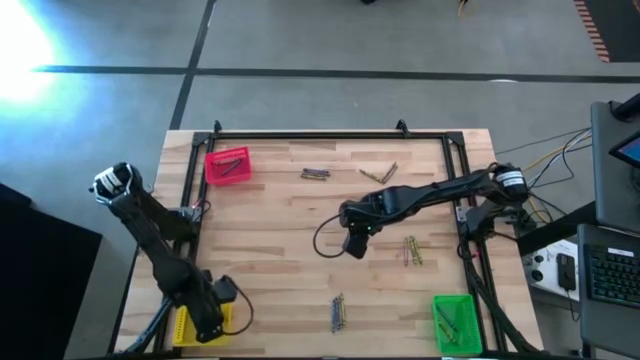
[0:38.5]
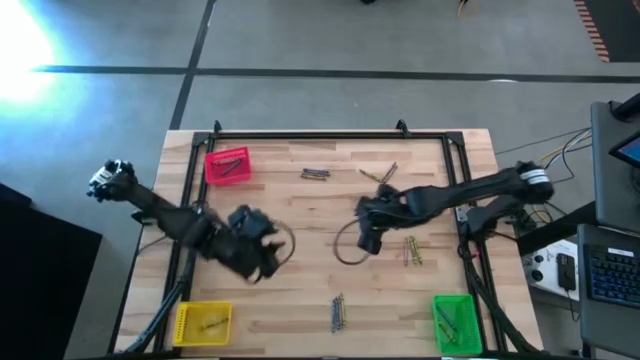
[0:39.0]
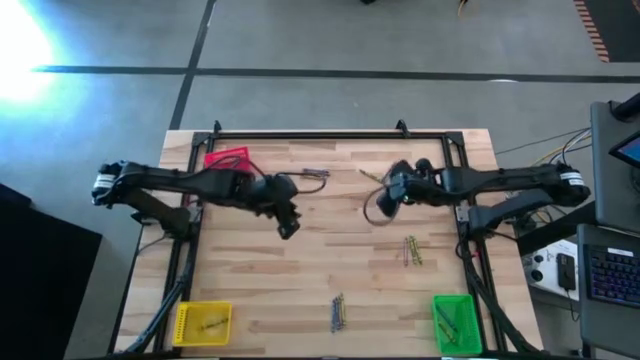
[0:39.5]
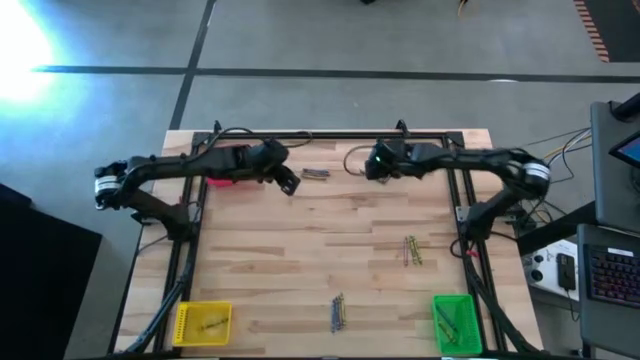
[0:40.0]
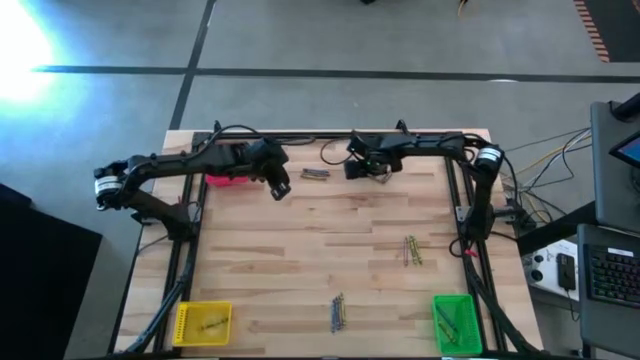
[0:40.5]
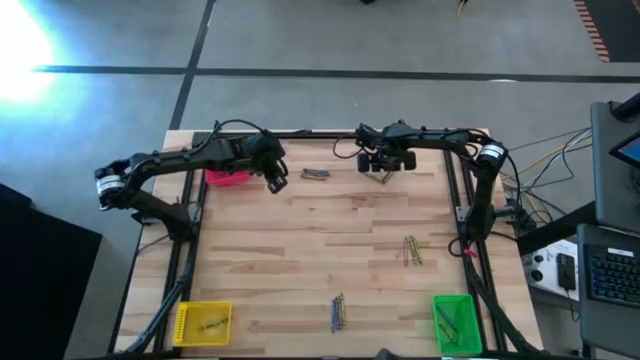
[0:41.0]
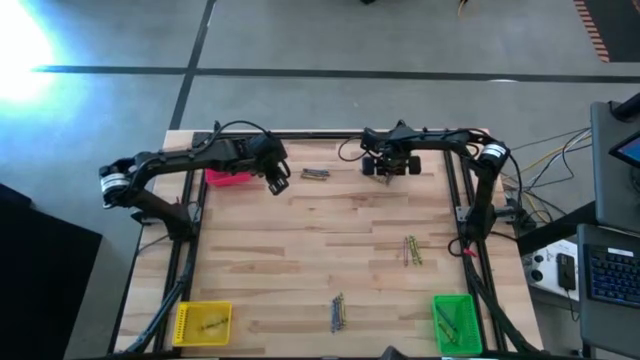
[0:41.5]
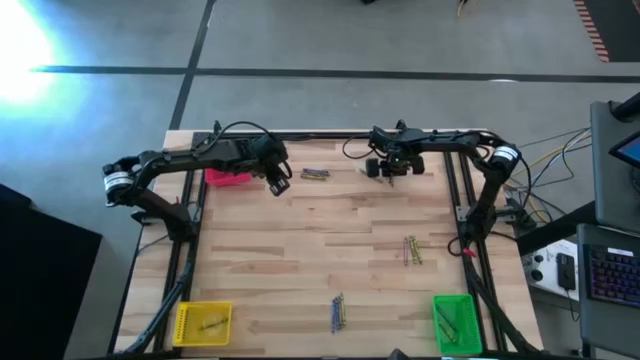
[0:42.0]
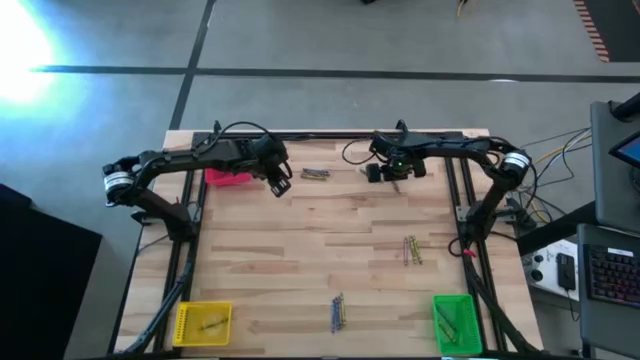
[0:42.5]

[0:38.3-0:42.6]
Task: Sort crayons
Put the brown crayon into the yellow bin

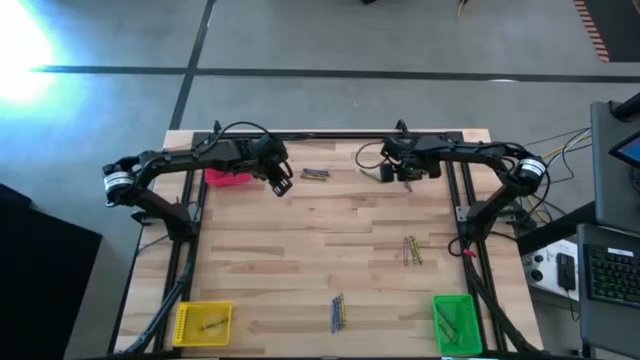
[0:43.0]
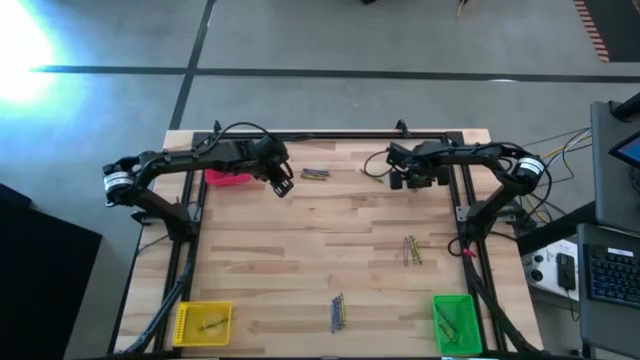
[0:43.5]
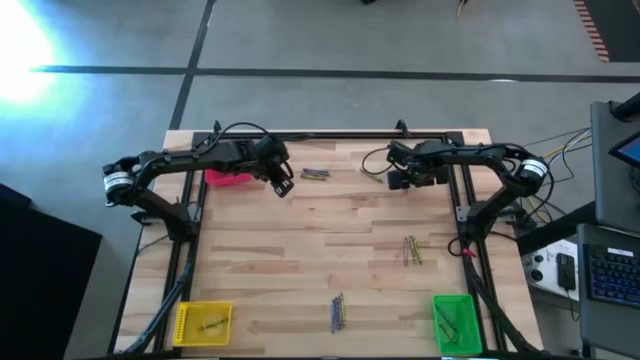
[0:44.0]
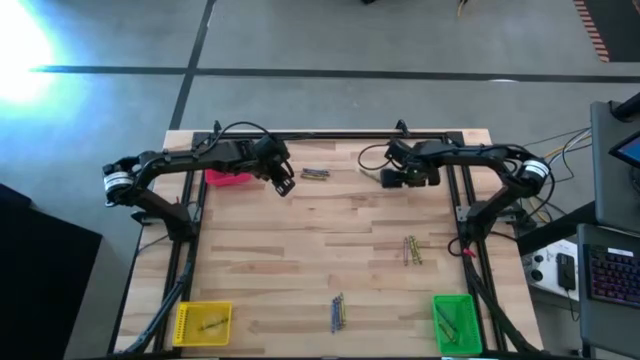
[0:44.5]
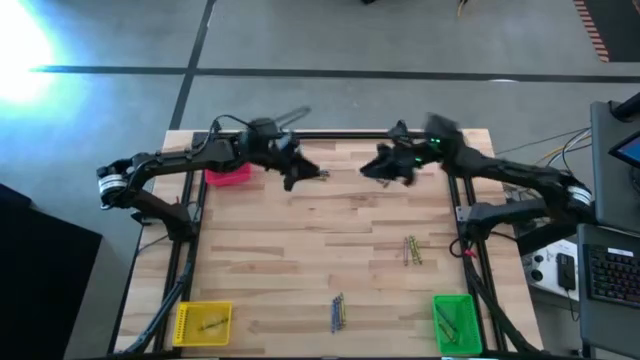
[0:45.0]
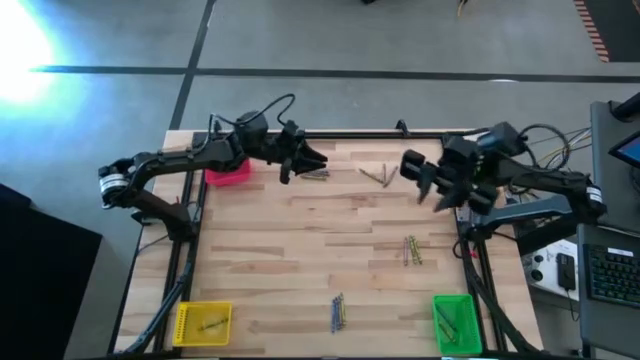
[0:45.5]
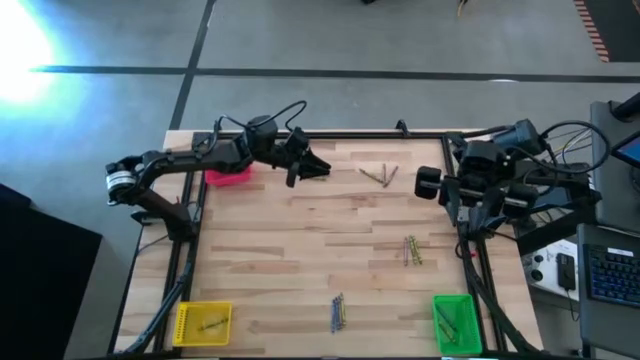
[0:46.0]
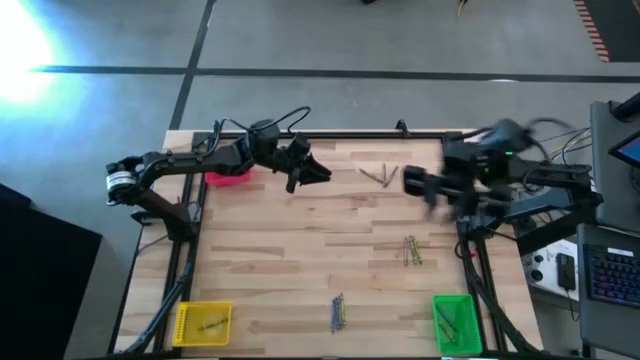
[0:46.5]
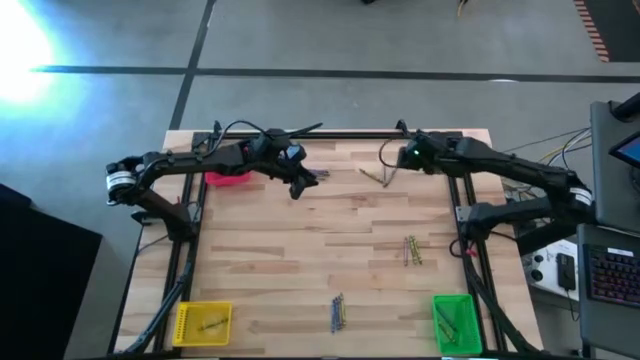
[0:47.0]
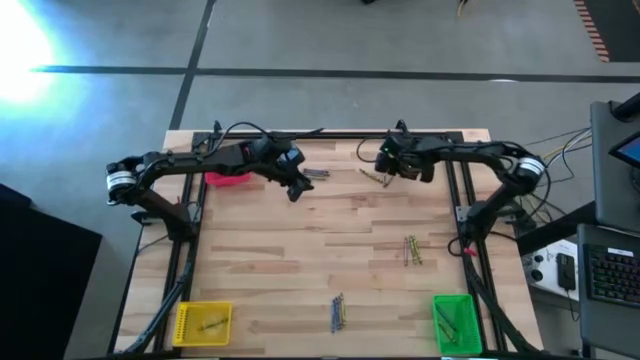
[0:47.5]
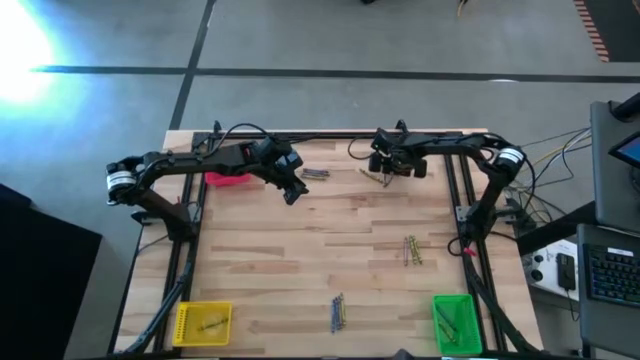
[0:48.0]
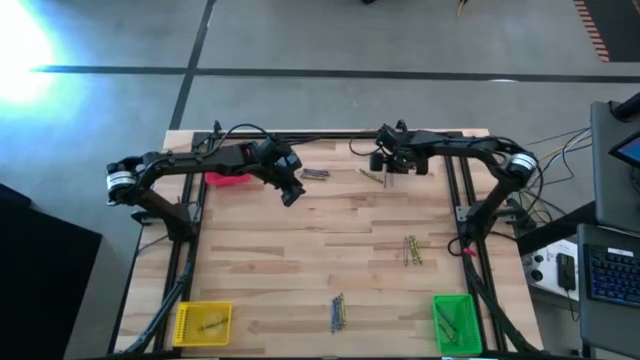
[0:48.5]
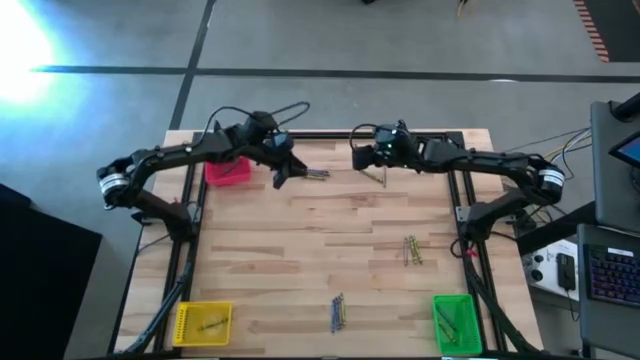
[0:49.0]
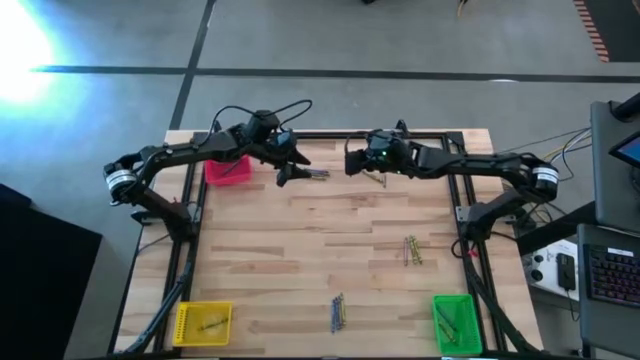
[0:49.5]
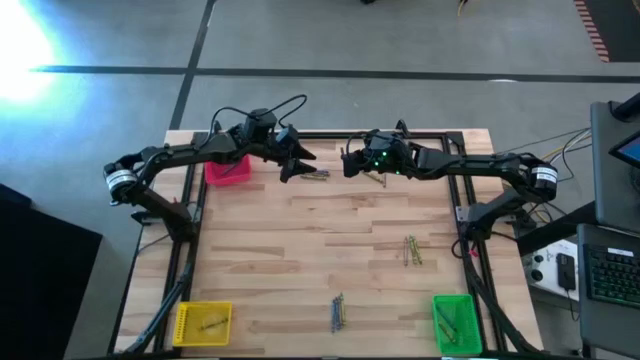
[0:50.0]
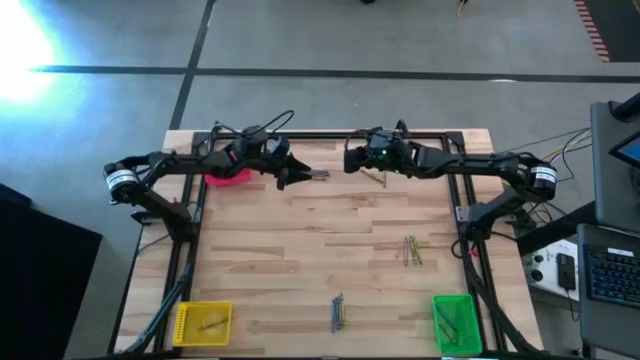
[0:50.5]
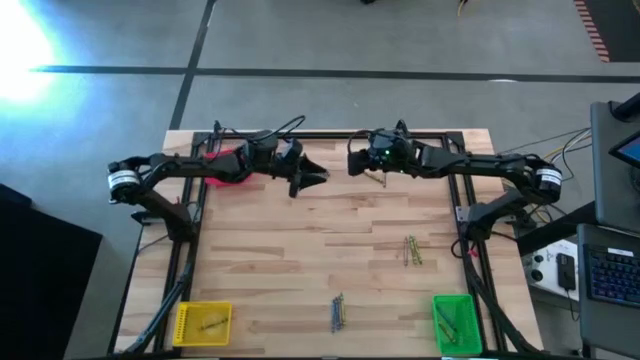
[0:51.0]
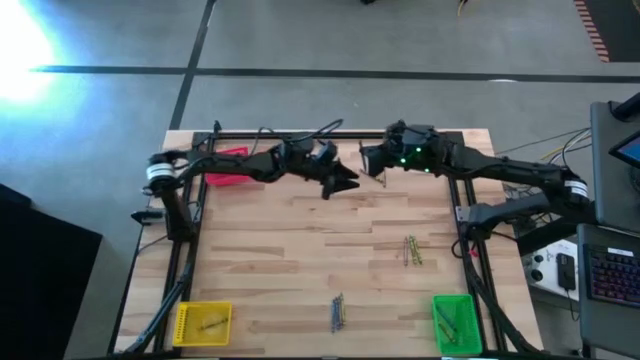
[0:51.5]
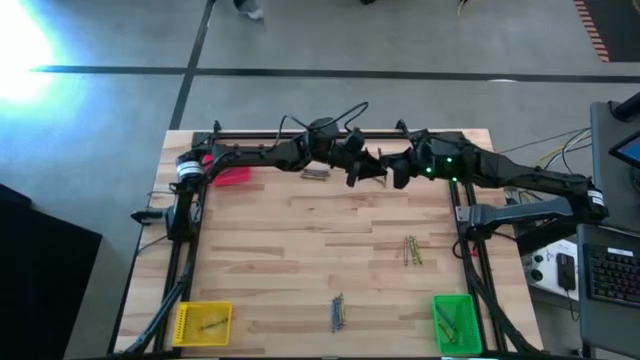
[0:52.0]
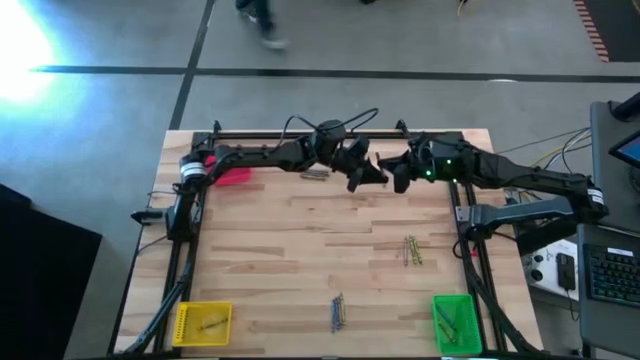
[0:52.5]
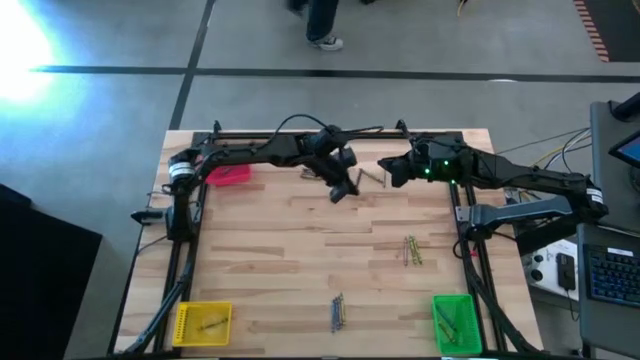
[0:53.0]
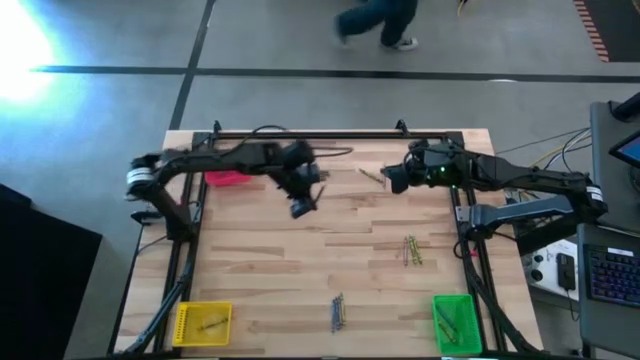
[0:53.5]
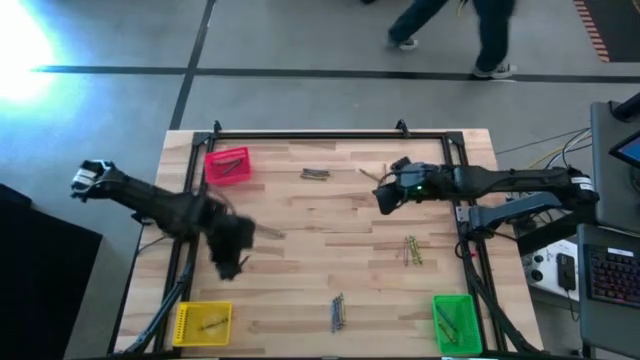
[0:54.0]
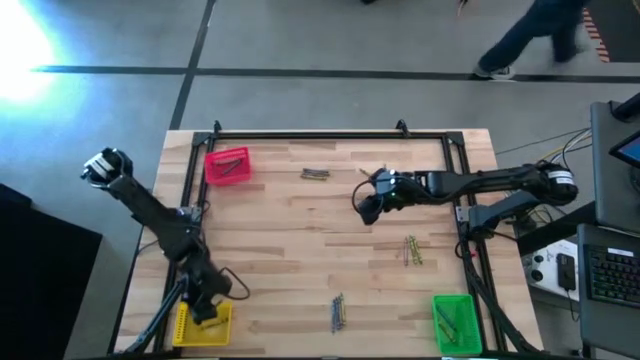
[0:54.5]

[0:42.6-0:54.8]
Put the brown crayon into the yellow bin

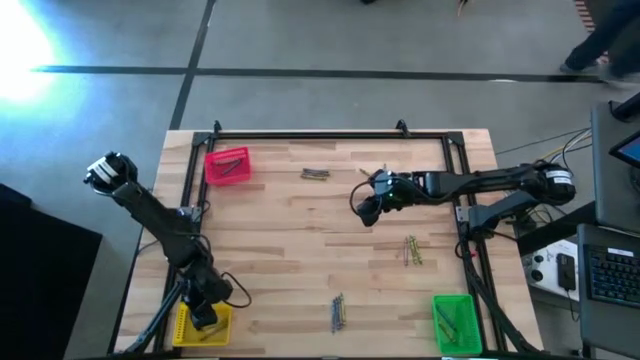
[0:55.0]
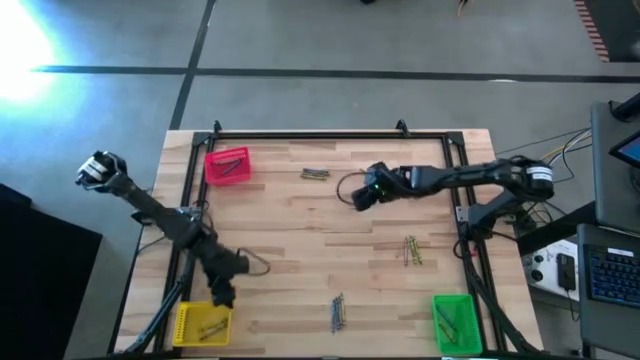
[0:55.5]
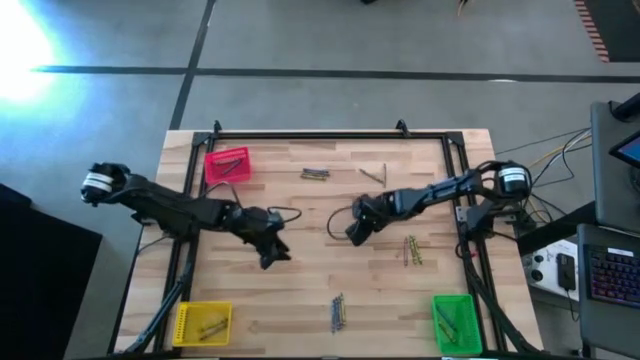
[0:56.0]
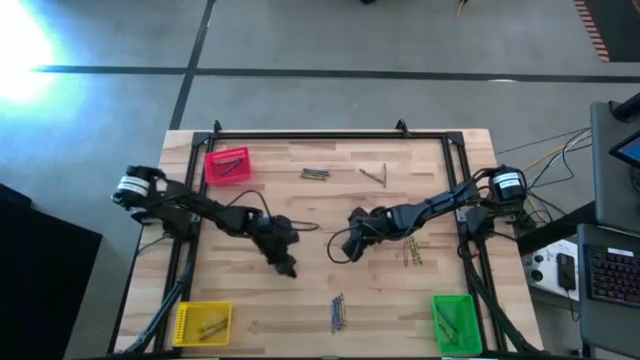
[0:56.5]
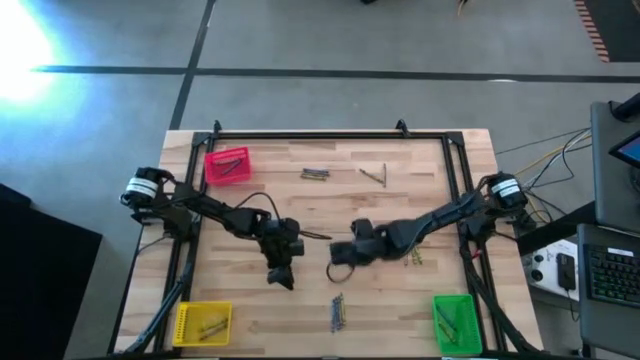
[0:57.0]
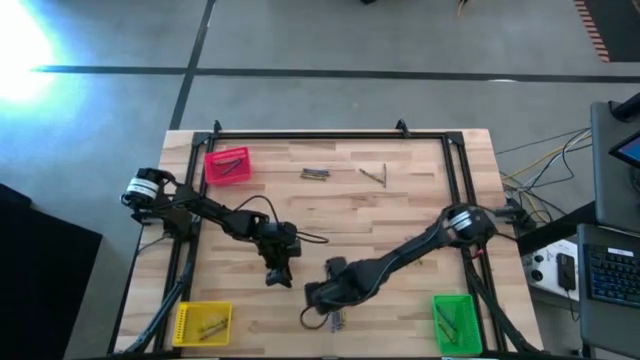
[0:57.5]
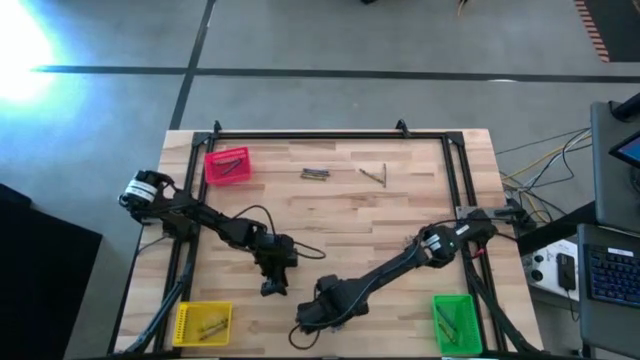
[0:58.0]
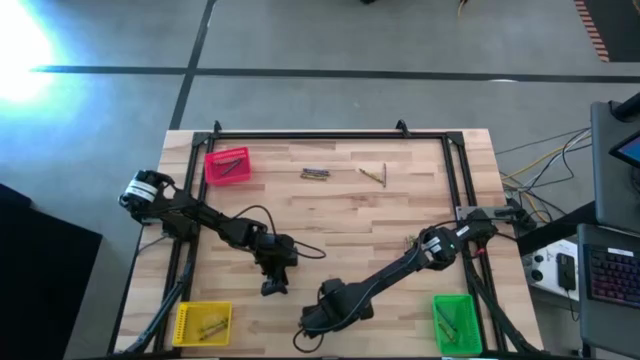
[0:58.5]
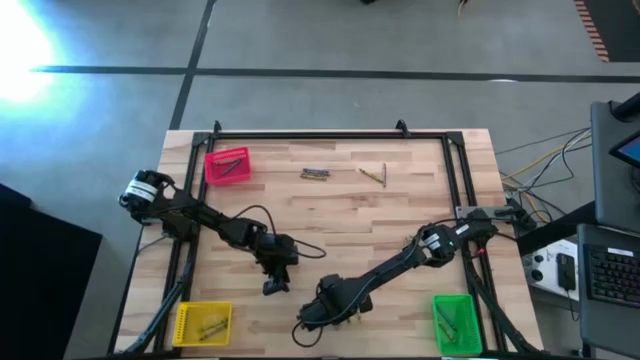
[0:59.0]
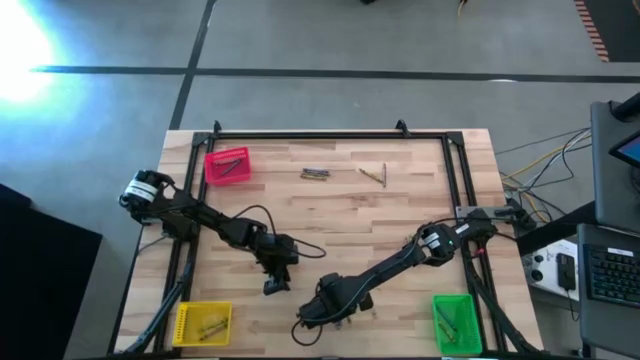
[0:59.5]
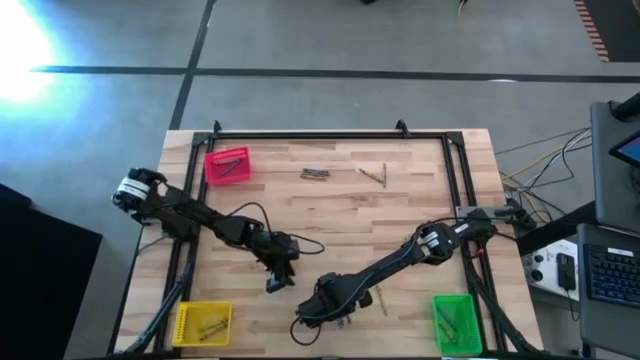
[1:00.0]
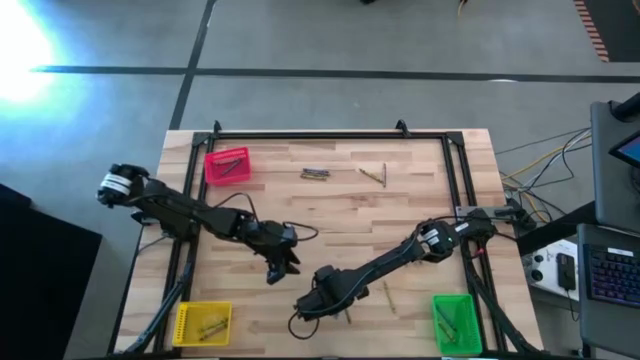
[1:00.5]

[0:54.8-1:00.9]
Put the blue crayon into the yellow bin
